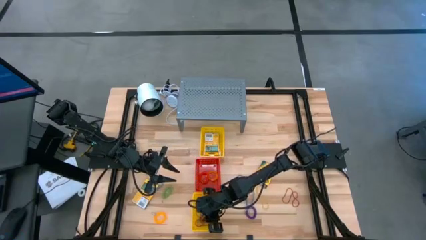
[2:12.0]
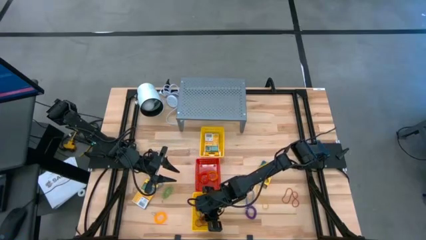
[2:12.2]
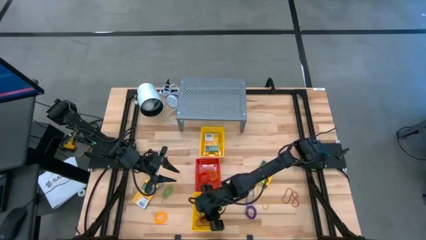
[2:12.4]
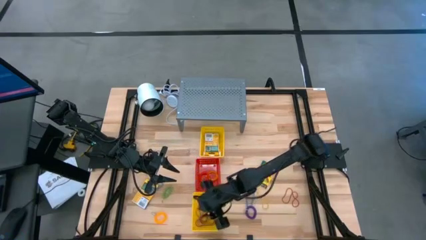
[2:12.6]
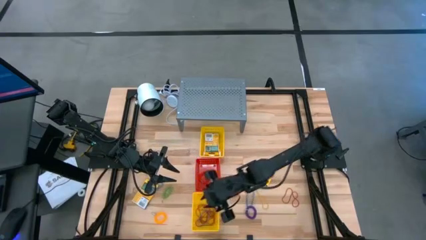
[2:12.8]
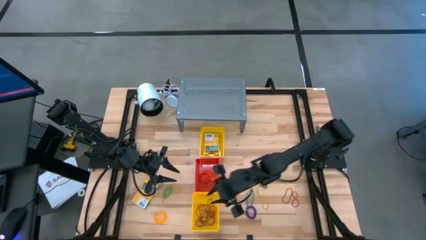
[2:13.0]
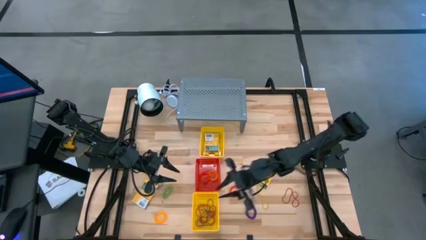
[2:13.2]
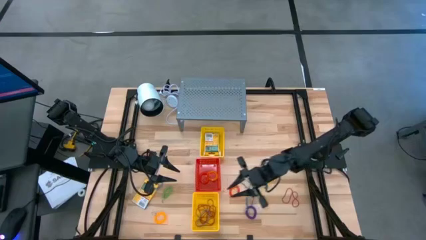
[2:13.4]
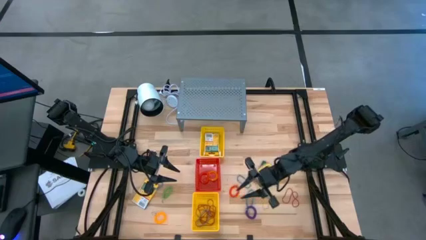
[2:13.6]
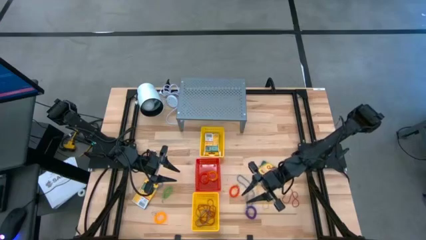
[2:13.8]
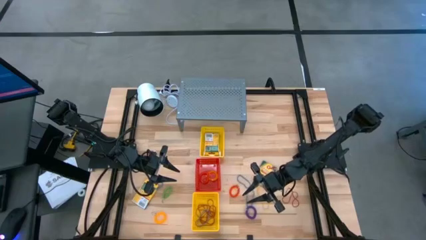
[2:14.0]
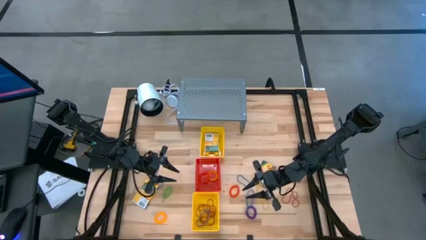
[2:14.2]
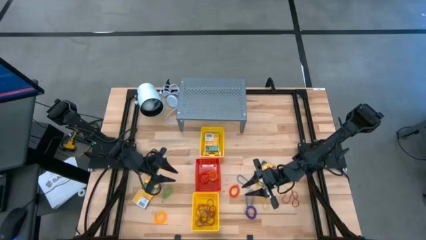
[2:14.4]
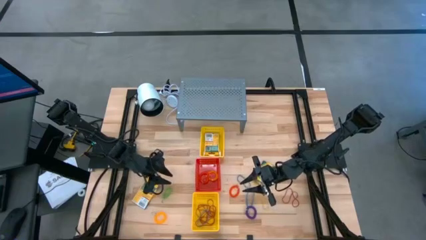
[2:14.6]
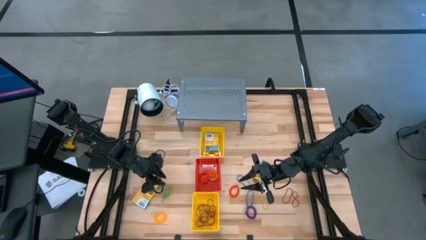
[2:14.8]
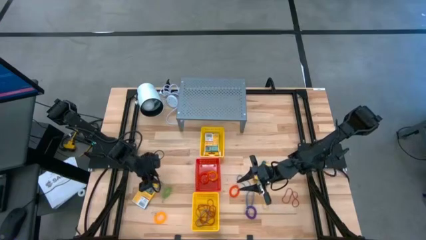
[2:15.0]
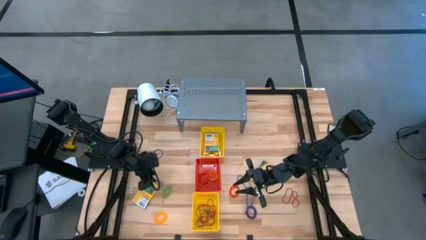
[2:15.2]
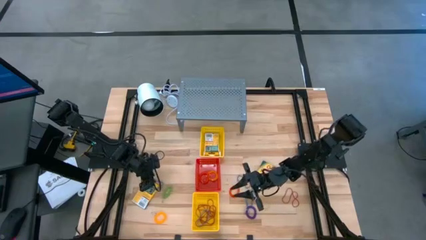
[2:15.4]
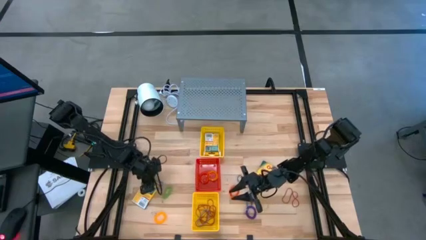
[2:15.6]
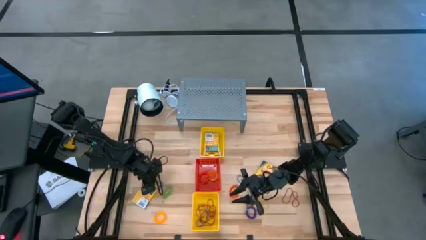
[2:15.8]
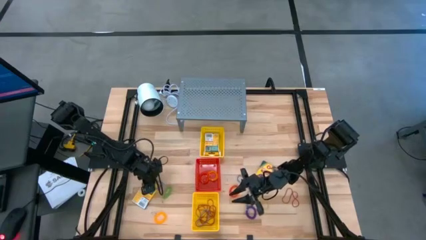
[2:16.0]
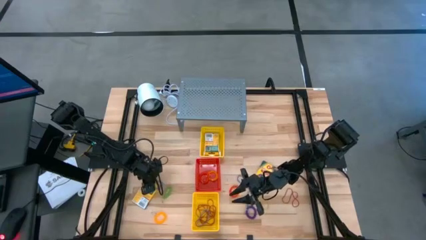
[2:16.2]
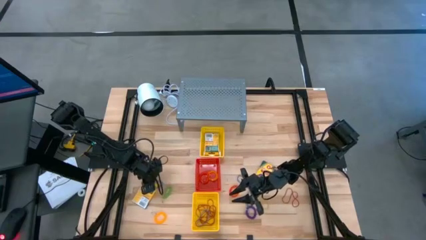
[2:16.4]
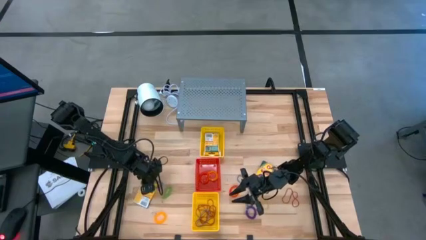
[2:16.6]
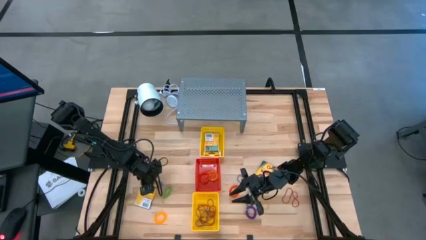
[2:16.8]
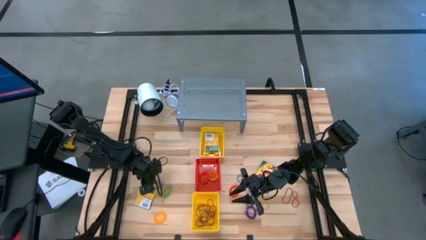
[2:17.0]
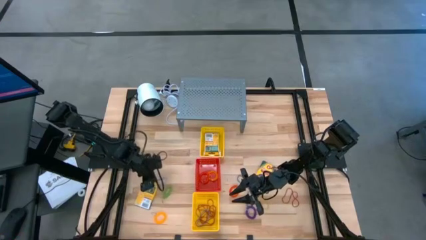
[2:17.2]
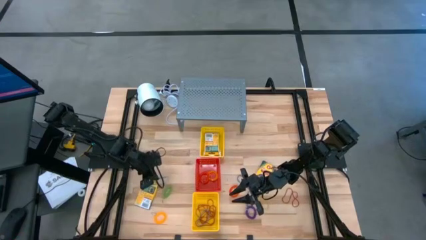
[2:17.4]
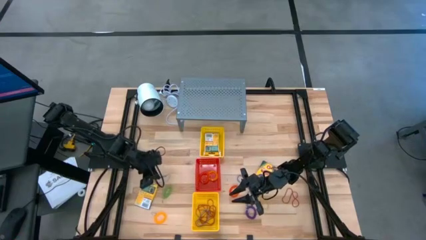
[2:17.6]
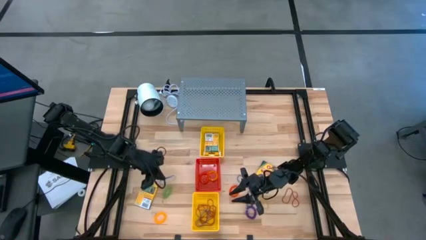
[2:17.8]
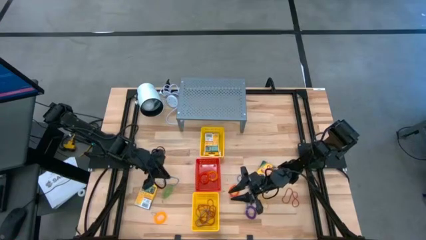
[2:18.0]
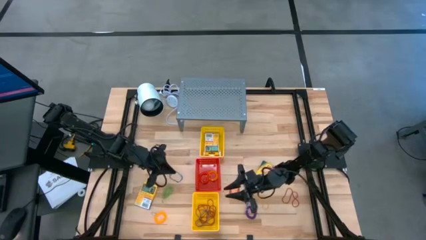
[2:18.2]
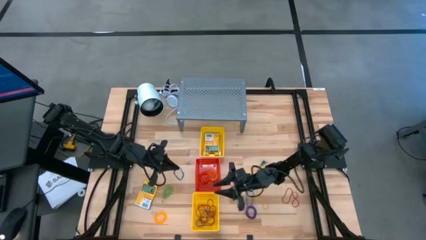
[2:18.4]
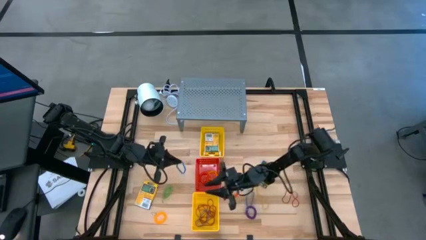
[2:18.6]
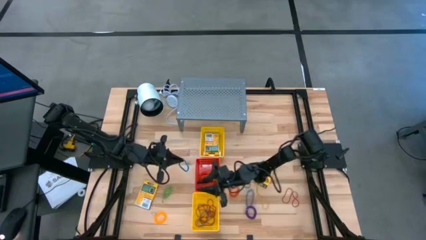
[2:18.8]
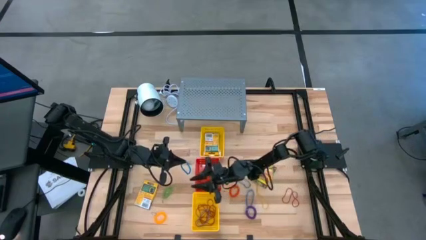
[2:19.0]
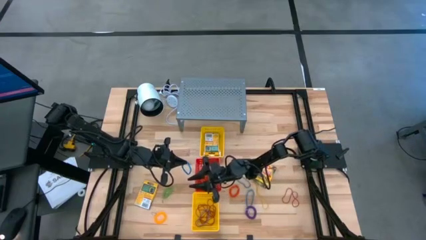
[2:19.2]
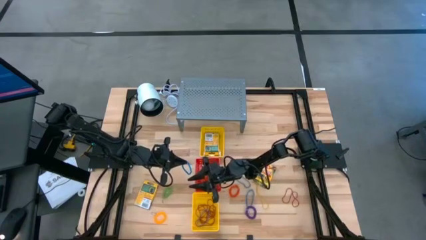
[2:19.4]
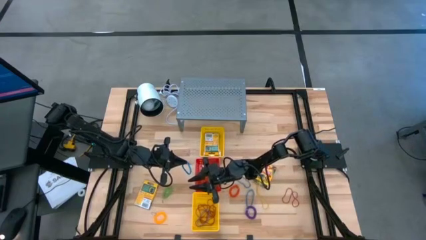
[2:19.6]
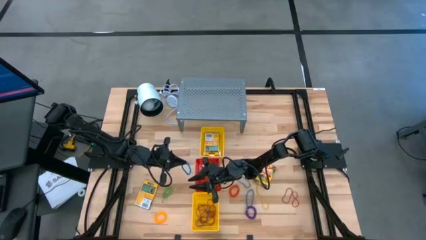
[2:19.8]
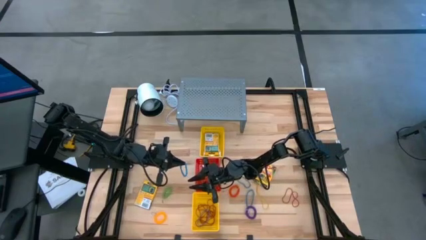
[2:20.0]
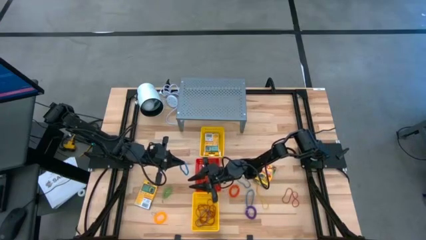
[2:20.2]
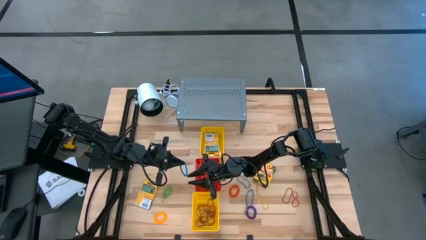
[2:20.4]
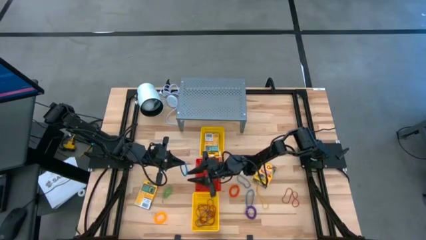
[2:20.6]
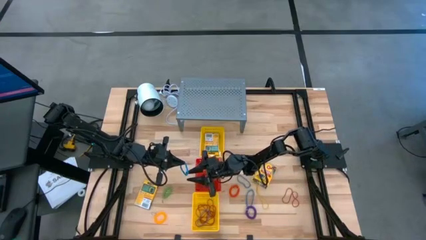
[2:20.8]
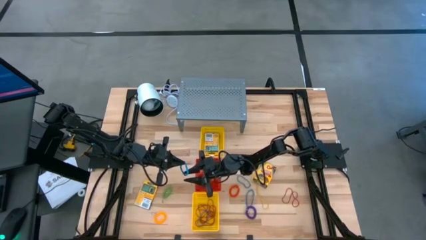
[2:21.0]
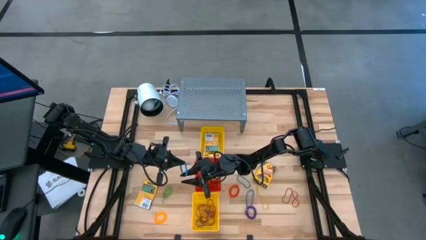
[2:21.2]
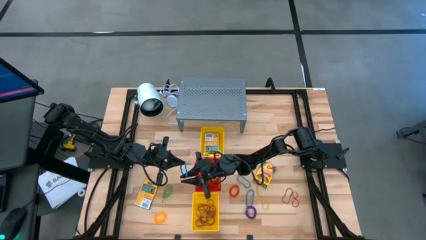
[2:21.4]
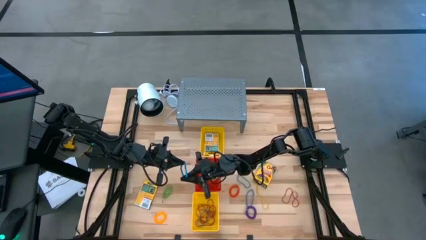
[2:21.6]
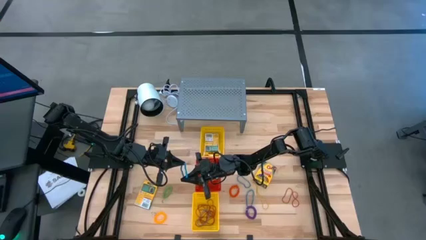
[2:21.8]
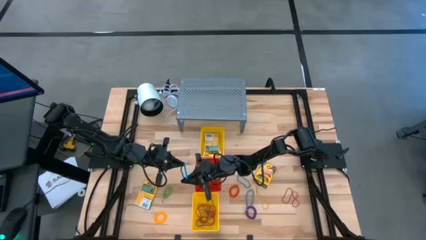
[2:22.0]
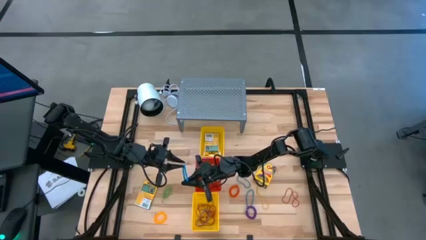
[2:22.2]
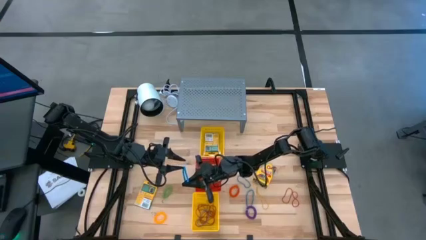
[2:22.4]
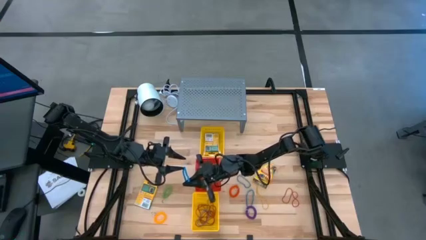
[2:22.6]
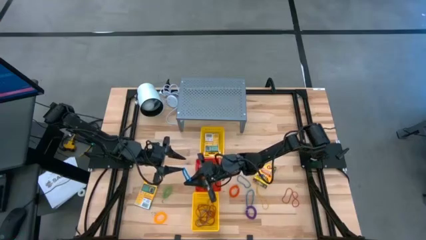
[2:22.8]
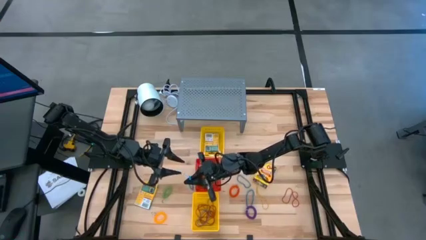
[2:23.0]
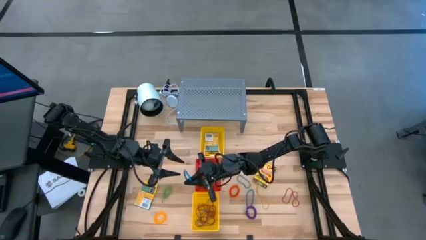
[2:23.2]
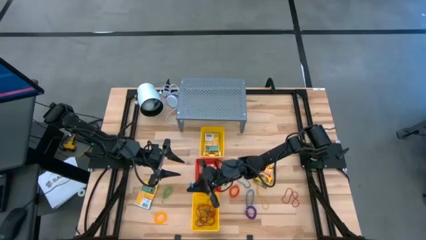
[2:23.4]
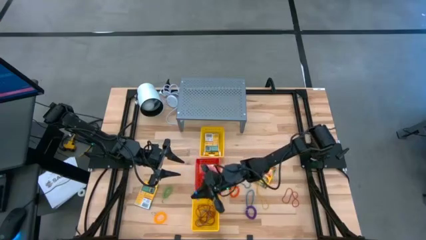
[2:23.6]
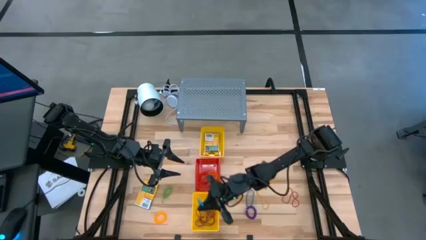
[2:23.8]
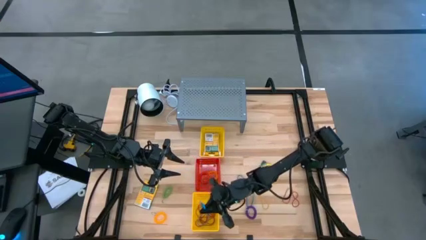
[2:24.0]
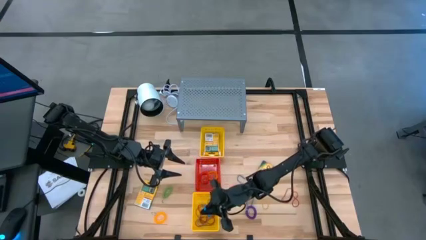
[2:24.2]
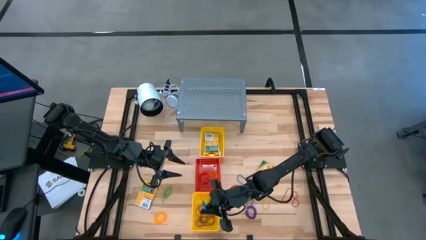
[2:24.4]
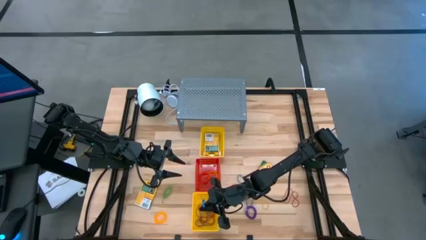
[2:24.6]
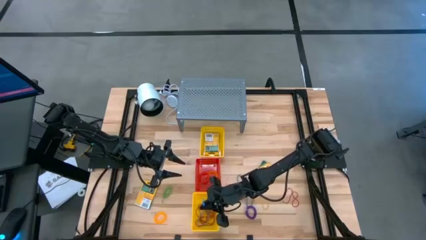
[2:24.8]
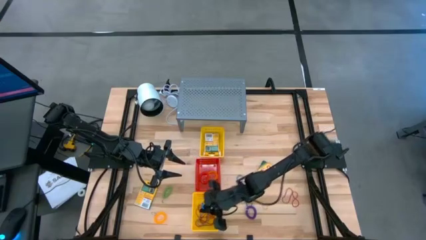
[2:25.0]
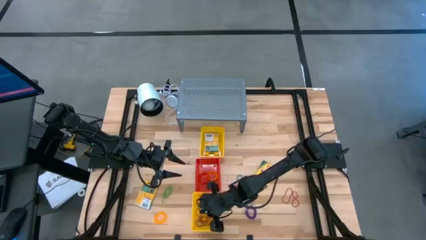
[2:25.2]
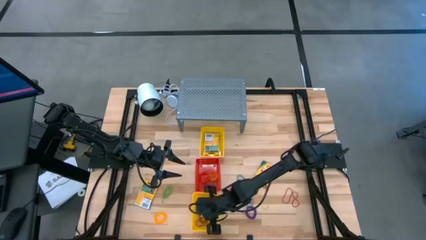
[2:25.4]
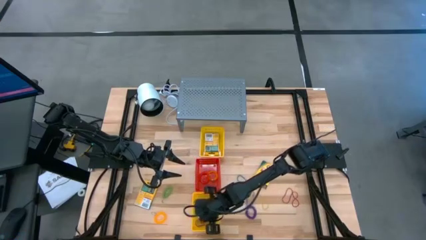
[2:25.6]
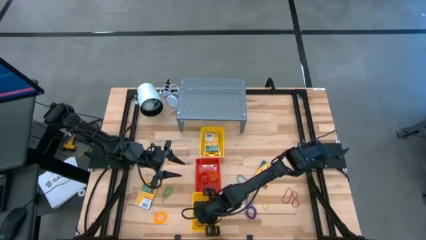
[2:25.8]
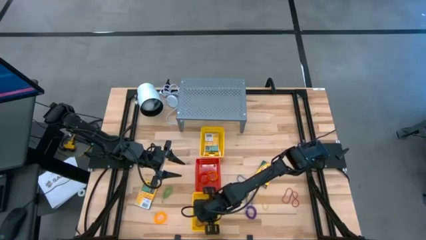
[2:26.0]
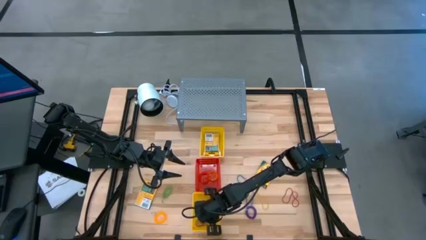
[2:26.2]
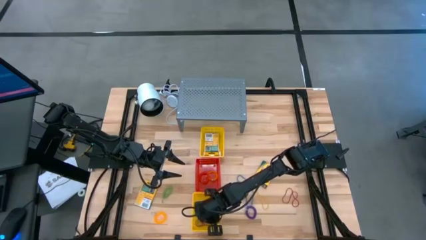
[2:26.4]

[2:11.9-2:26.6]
Task: Pick & Place Office Desk Supplies
Put the blue rubber band into the bottom yellow bin

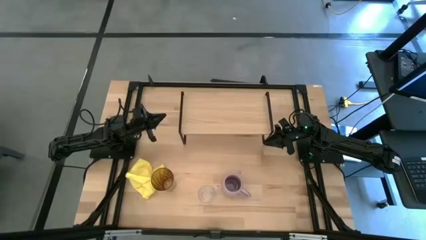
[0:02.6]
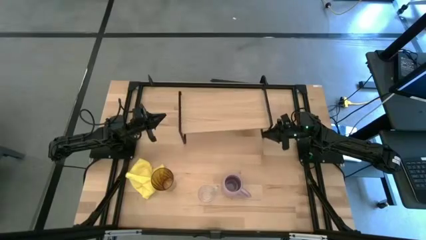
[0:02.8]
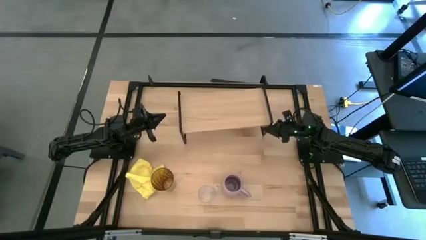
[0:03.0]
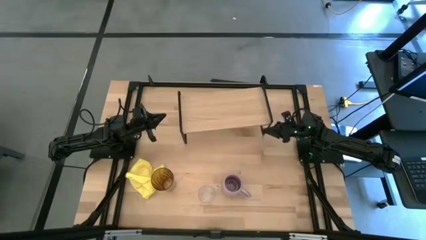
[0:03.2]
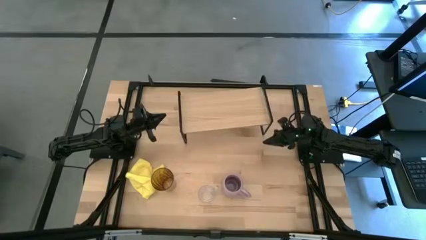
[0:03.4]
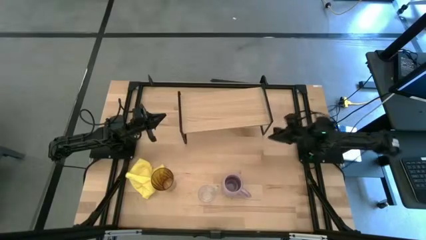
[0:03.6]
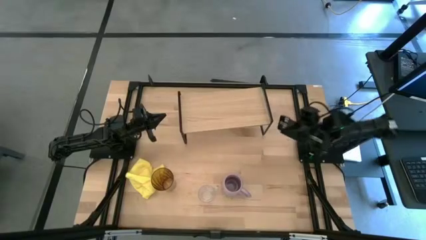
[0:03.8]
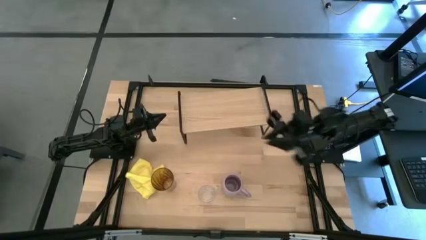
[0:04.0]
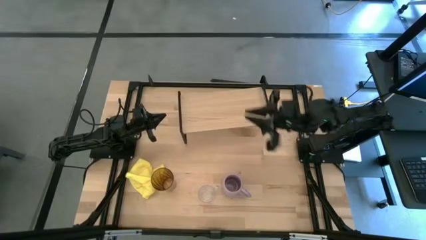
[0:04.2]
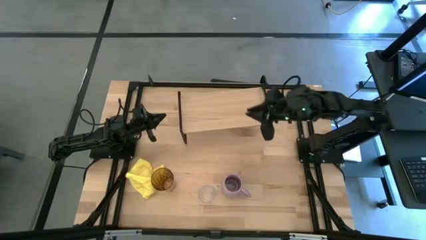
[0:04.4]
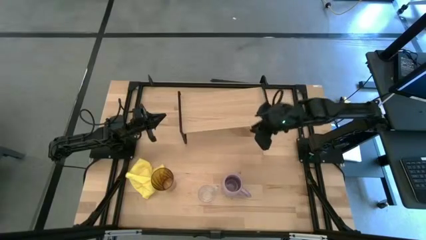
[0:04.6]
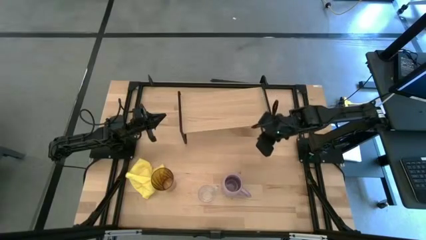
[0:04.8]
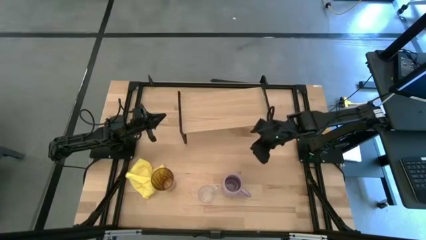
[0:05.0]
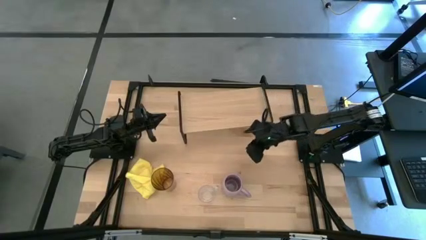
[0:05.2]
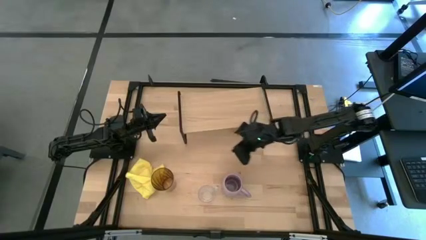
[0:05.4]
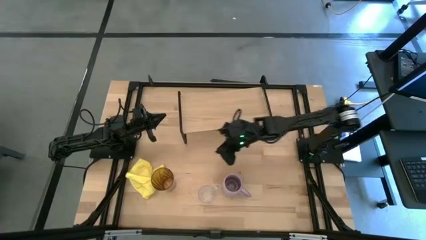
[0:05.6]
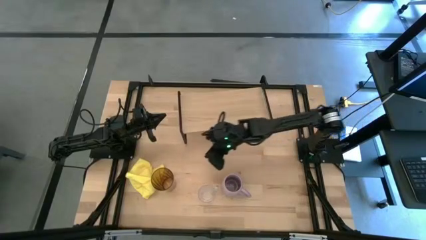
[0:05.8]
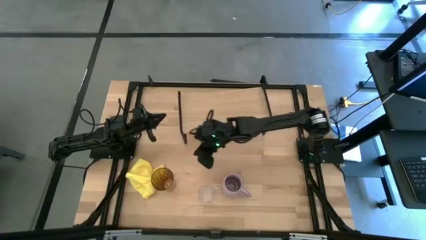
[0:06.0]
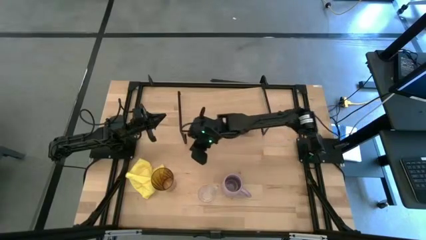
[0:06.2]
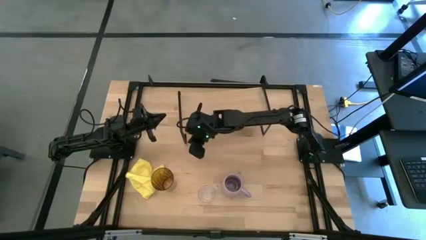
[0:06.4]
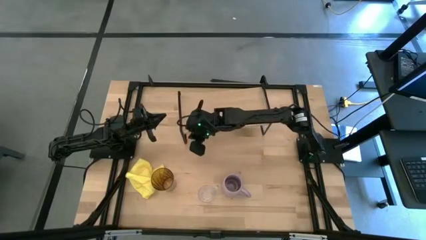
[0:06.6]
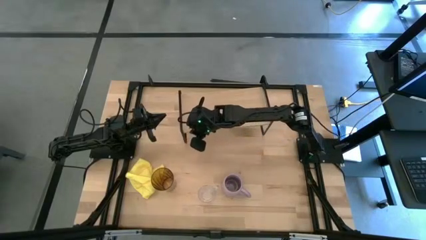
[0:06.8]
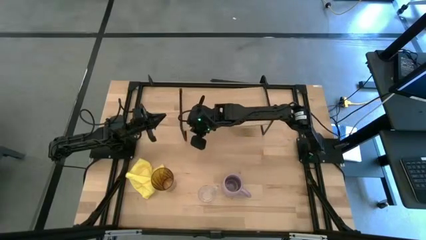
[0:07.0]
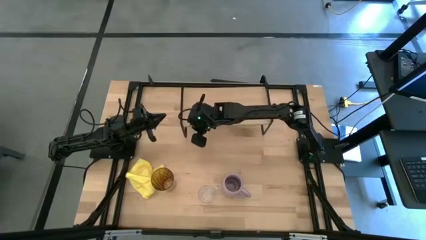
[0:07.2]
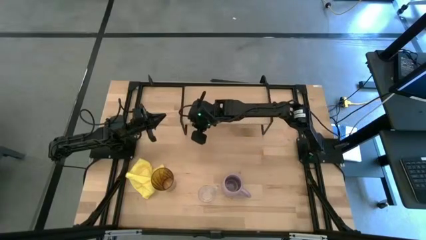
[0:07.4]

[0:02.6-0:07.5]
Task: Stack small to large cups/mugs on shelf
Adjust the shelf on the table
